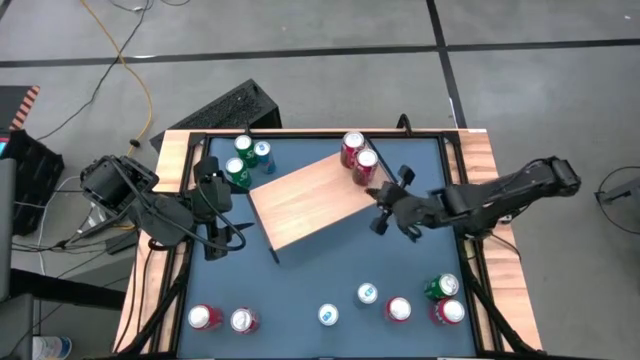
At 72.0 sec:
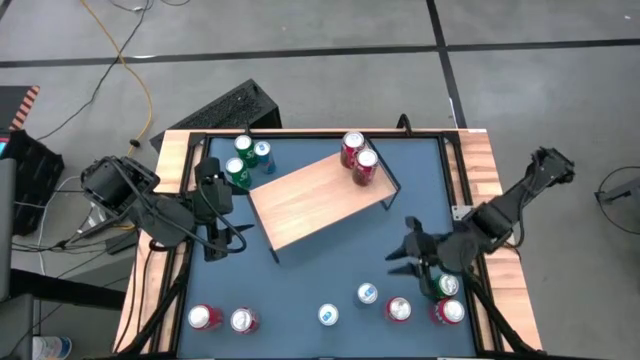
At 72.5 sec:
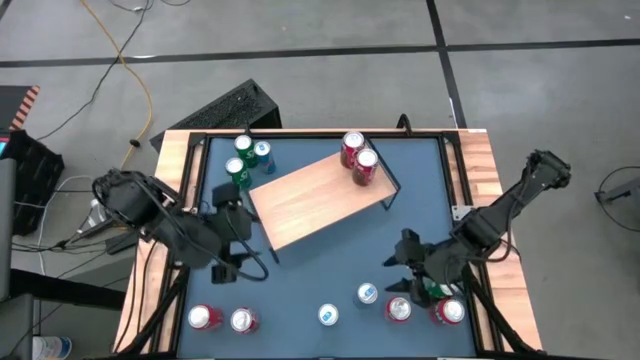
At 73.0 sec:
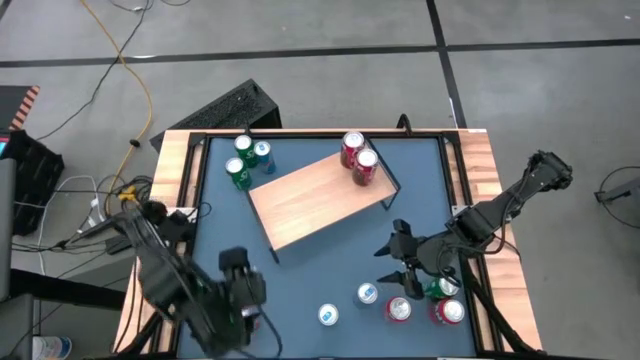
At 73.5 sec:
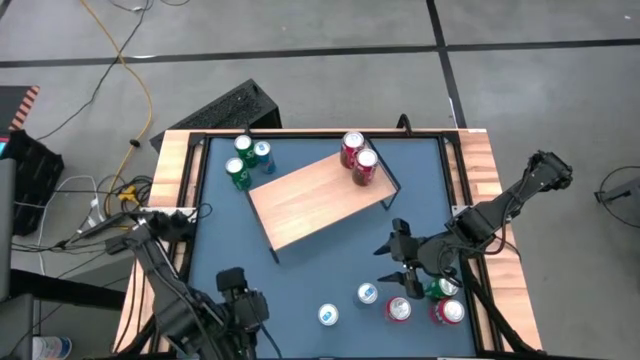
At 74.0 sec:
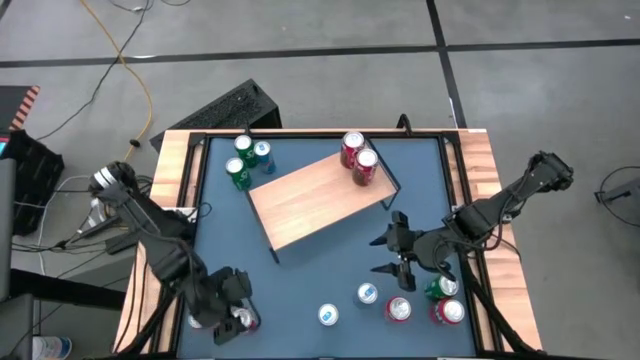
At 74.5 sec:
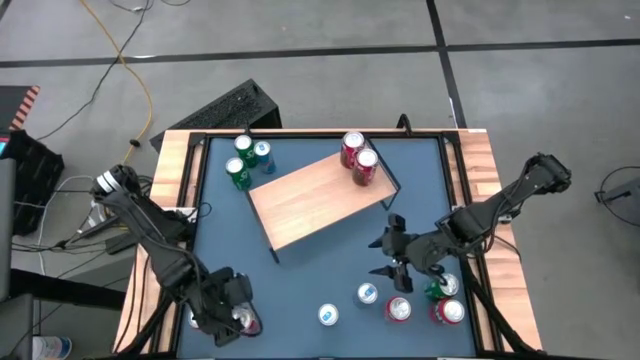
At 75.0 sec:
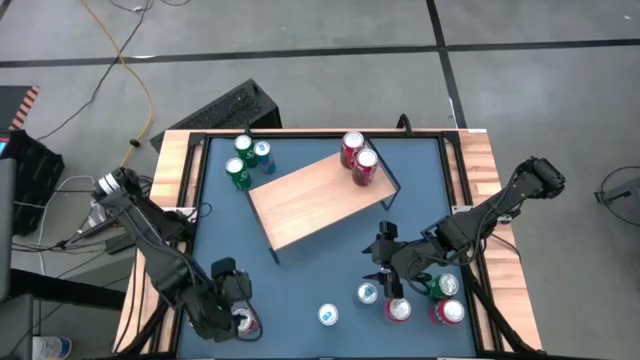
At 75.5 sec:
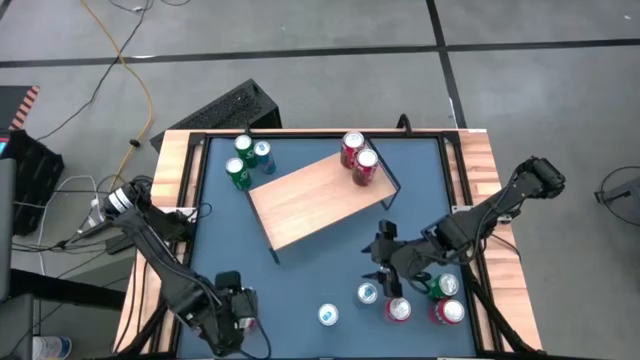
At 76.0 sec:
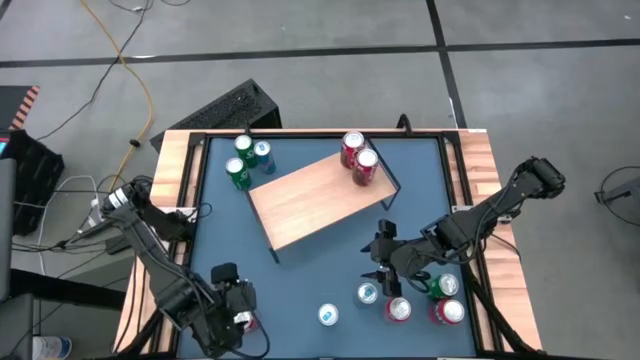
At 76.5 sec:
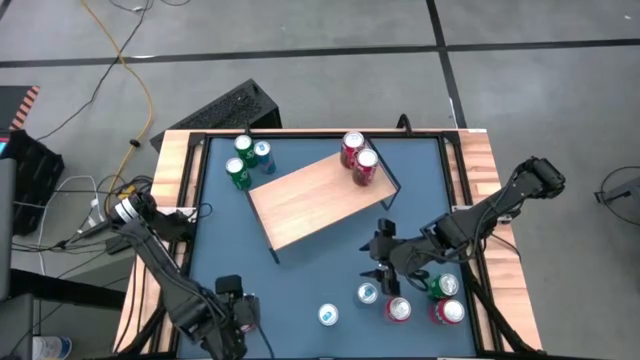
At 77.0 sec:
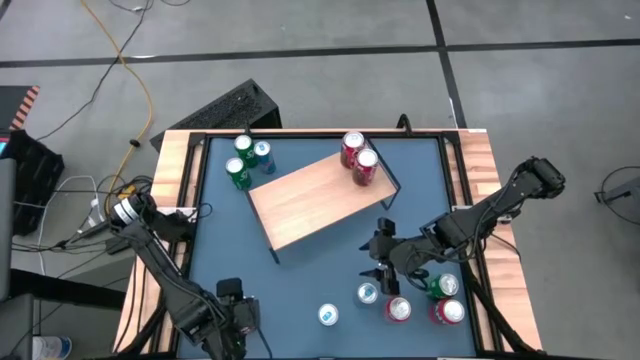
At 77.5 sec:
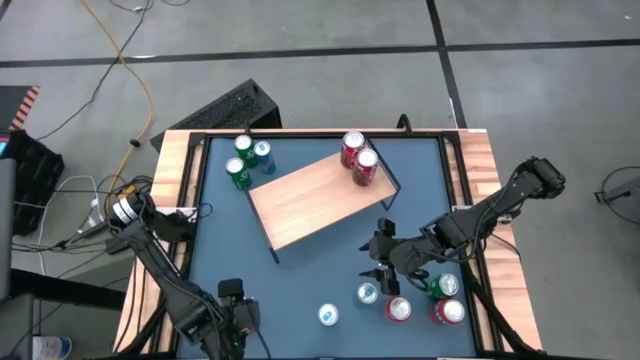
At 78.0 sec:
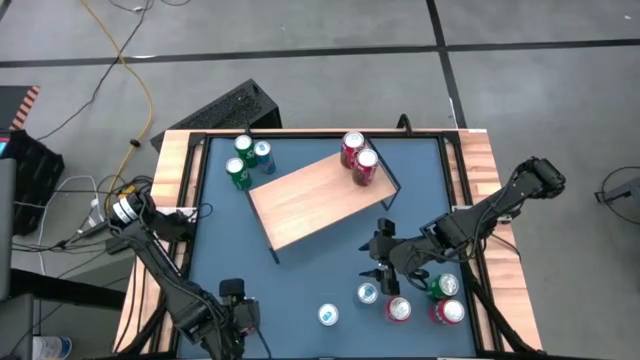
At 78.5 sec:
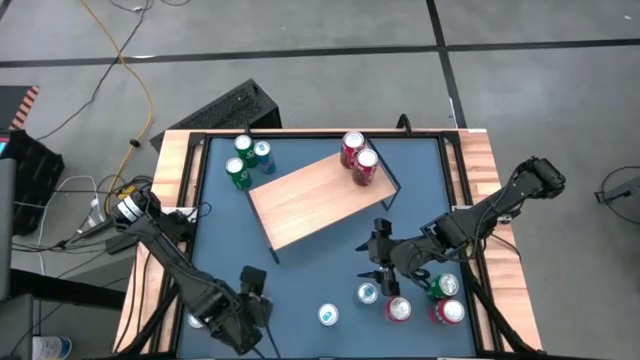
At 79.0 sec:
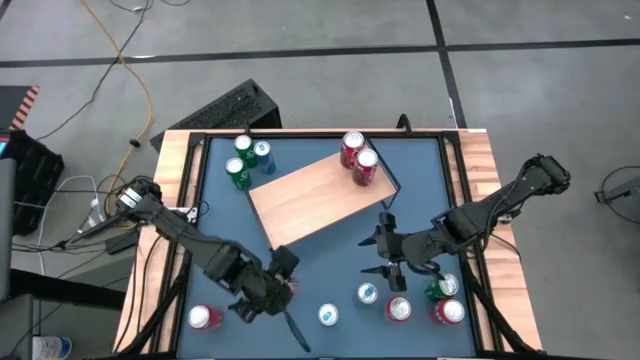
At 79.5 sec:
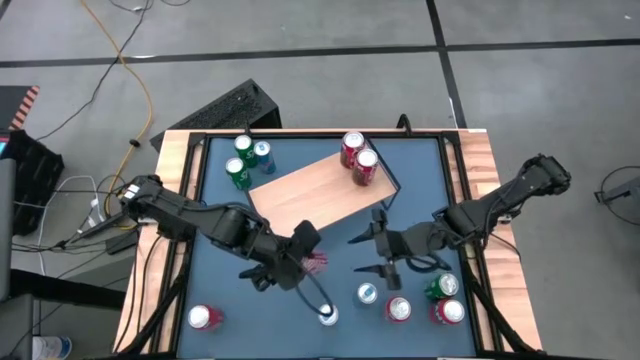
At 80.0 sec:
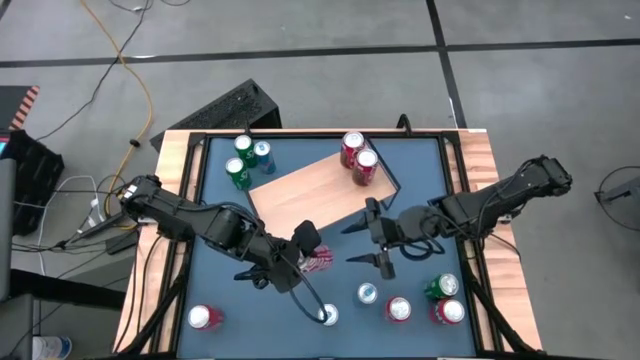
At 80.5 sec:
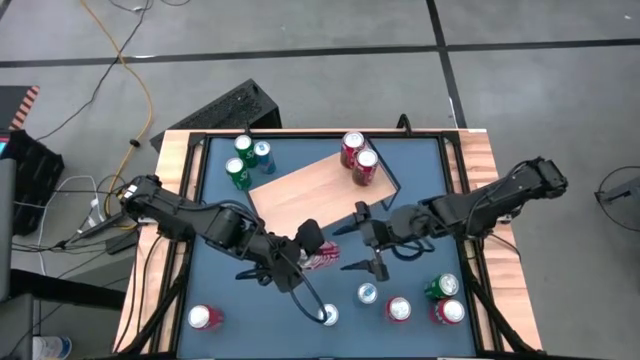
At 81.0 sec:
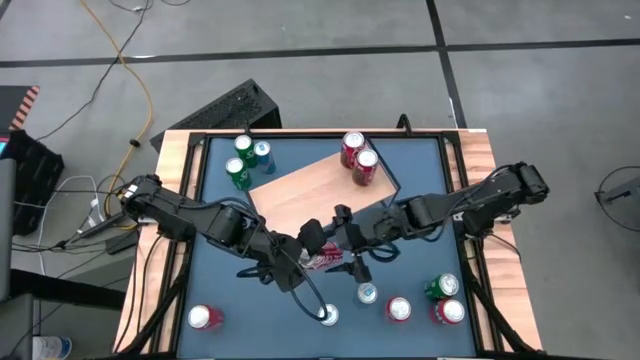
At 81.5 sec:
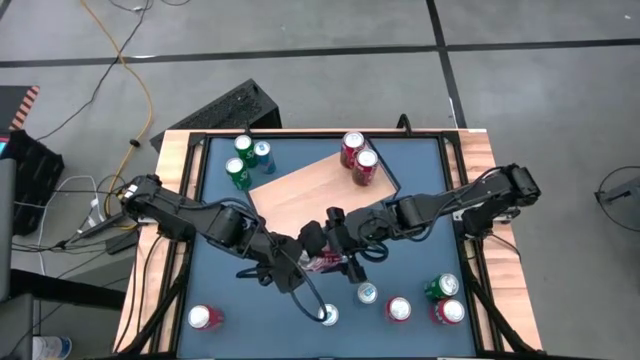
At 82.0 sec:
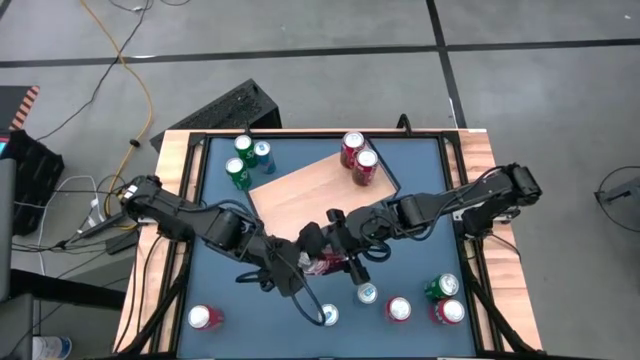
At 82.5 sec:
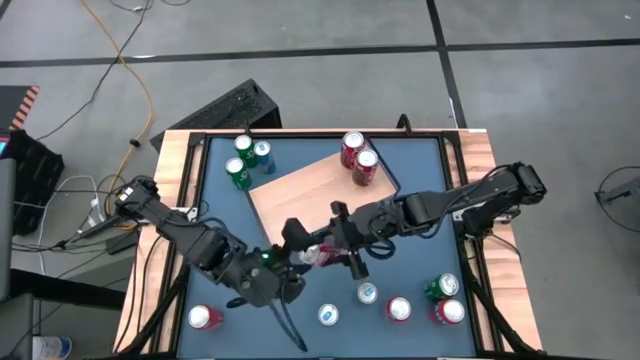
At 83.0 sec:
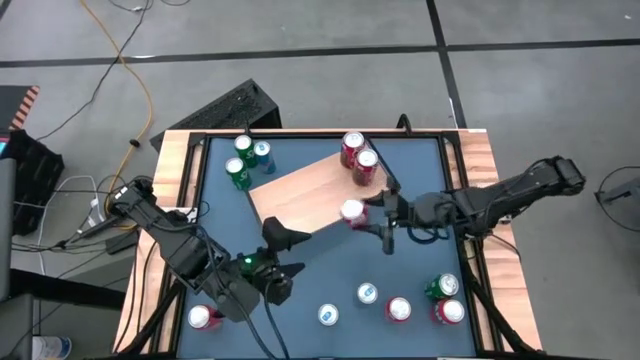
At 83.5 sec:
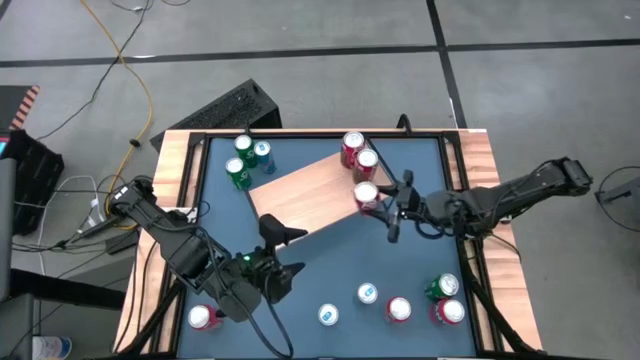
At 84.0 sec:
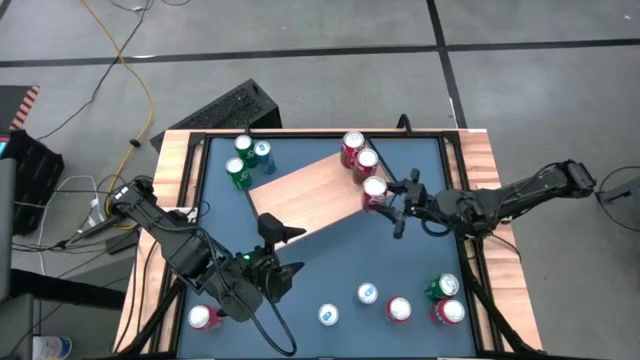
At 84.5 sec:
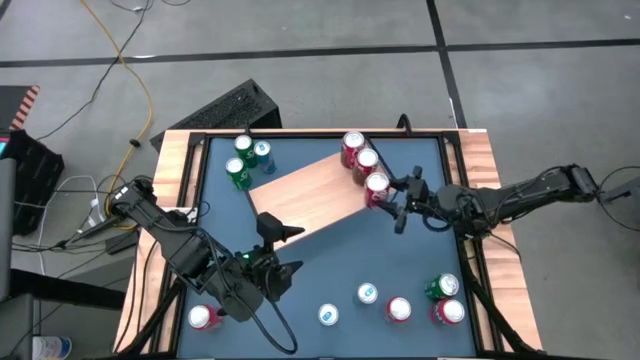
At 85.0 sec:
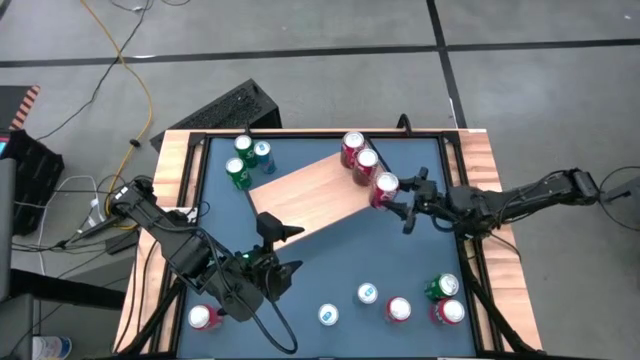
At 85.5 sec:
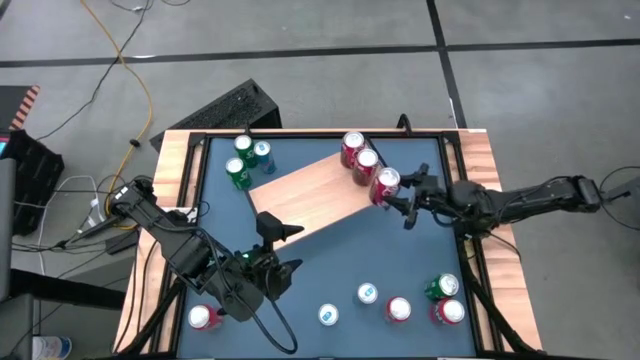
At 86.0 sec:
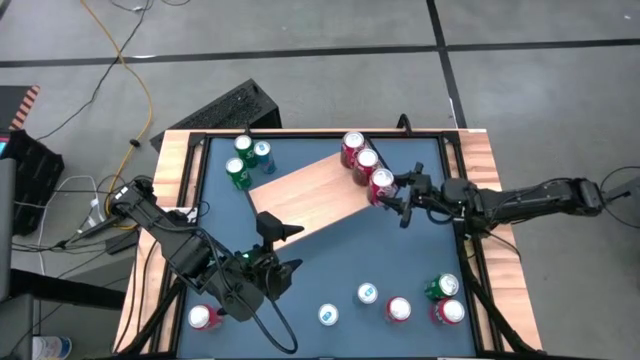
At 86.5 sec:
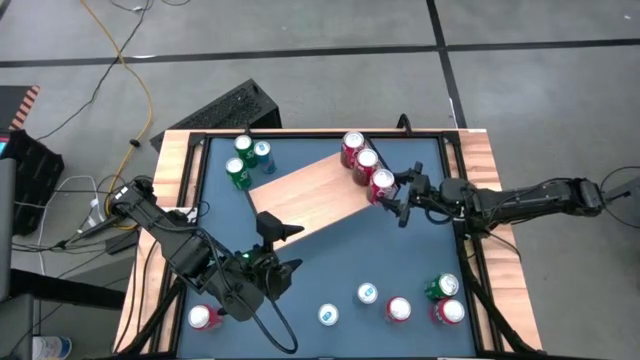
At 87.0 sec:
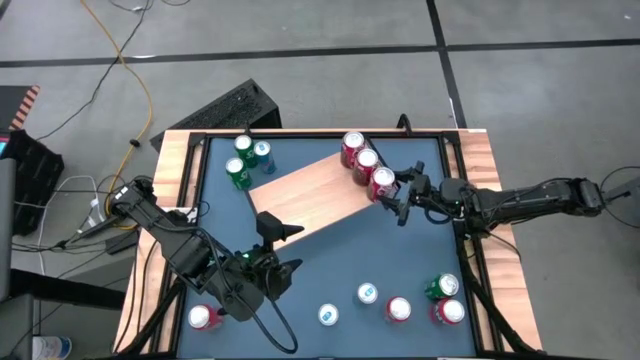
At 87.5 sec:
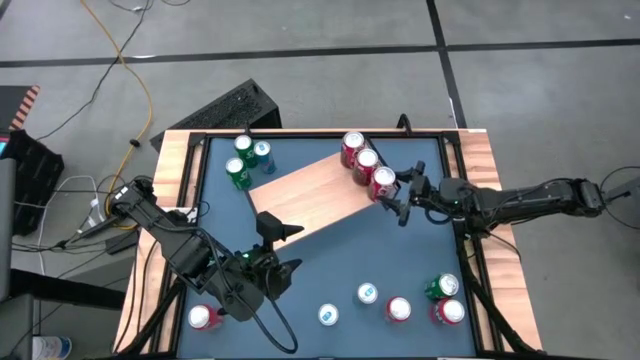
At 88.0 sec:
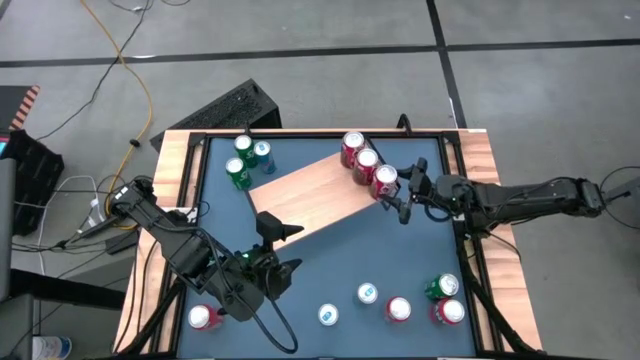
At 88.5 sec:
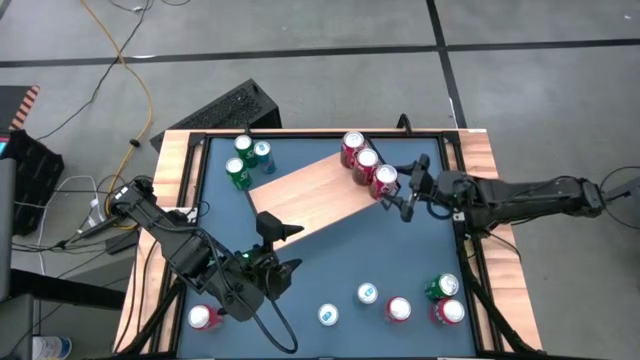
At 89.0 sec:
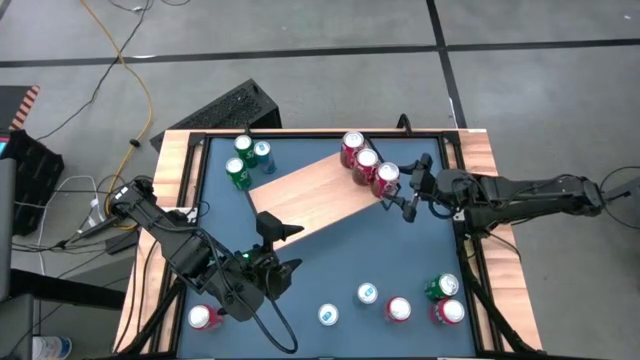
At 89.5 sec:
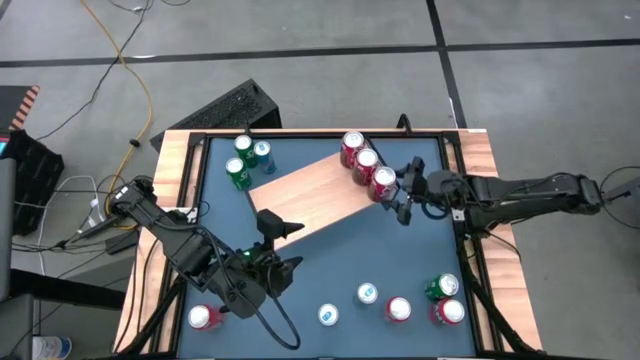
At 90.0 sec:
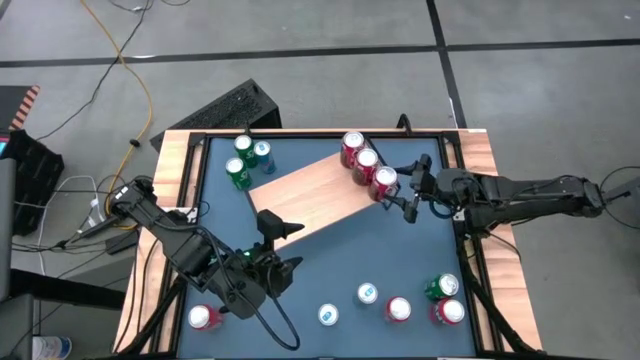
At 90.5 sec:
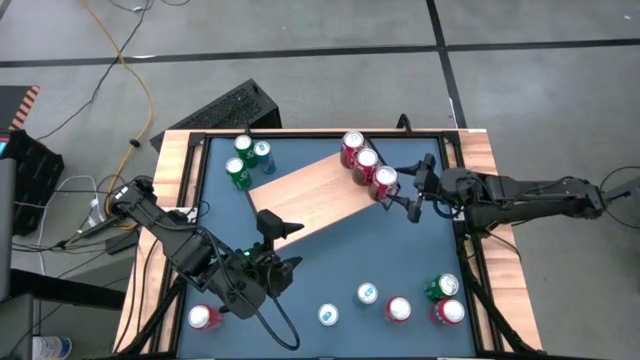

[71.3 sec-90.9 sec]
Task: Place canned beverage on shelf
Put the red white soda can on the shelf aligned with the other red white soda cans
